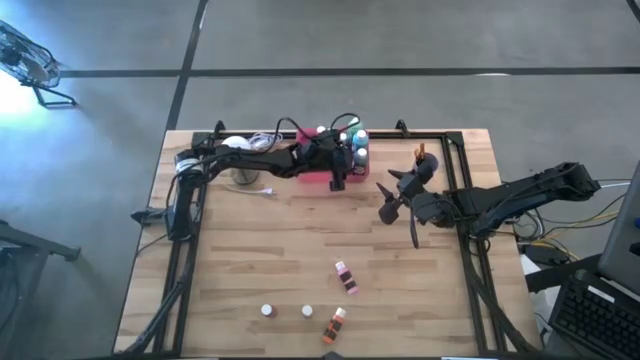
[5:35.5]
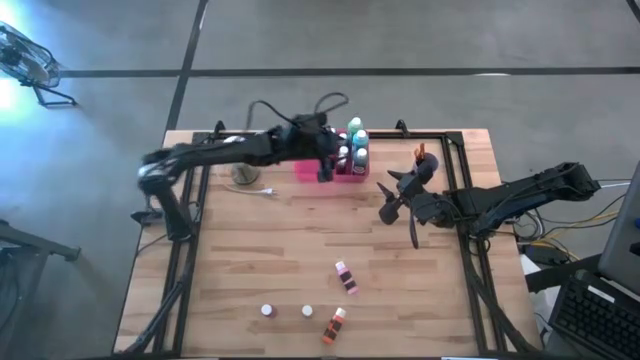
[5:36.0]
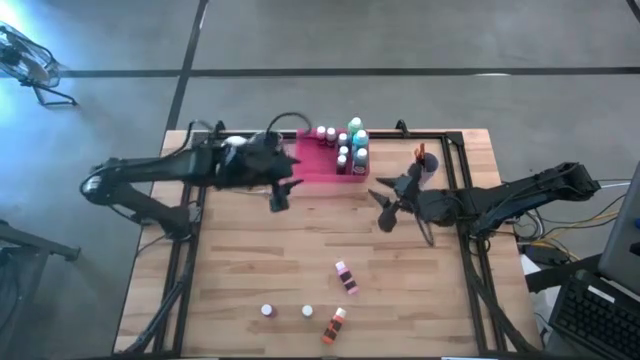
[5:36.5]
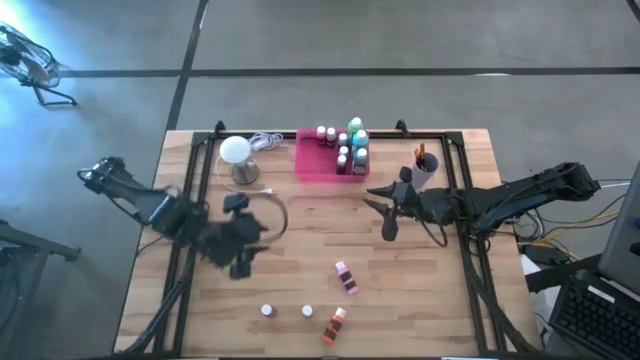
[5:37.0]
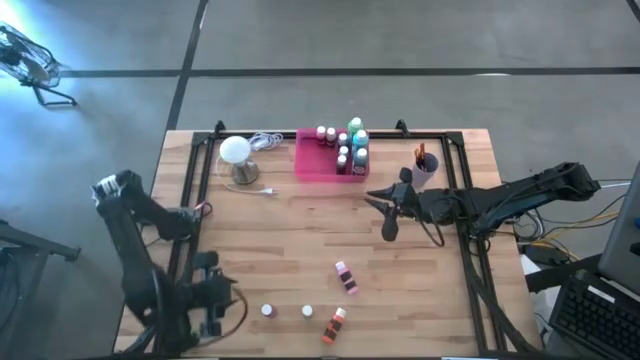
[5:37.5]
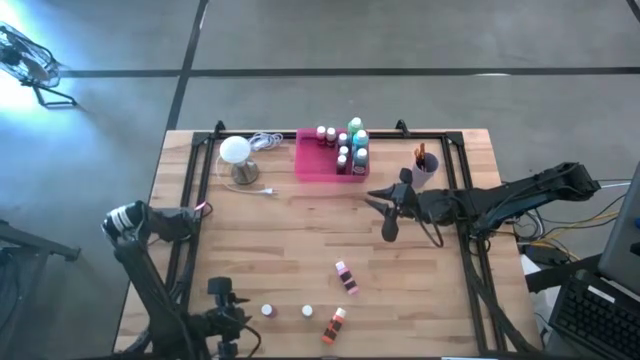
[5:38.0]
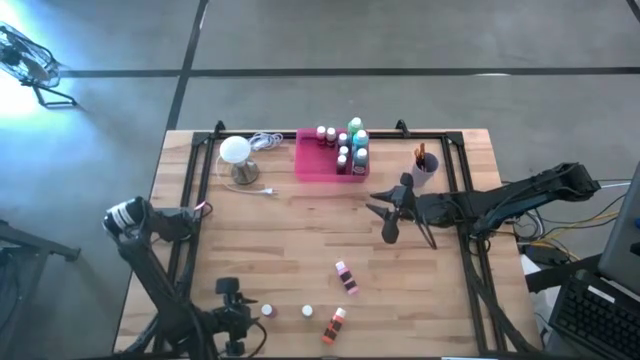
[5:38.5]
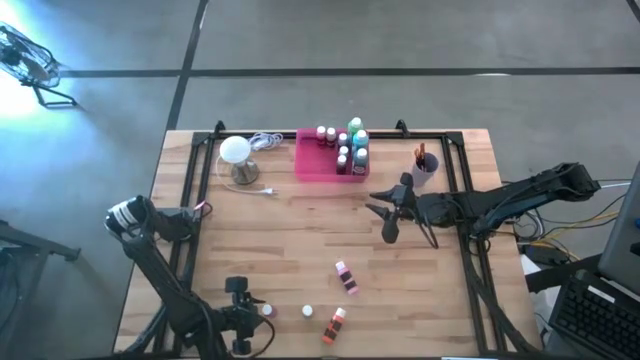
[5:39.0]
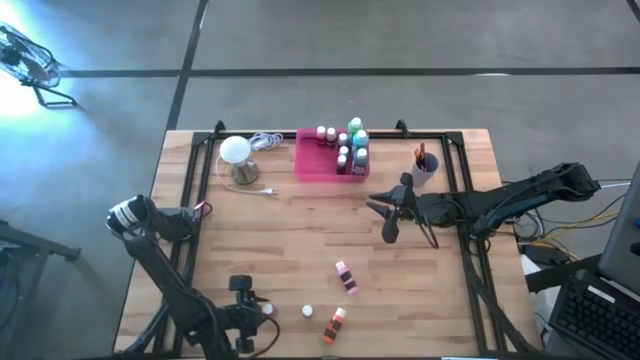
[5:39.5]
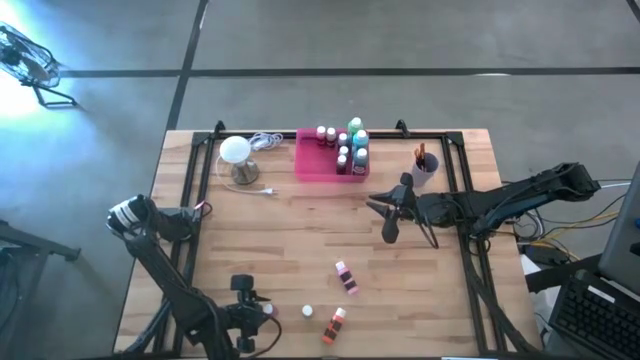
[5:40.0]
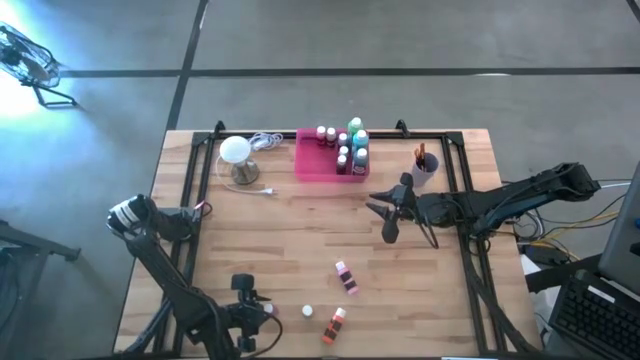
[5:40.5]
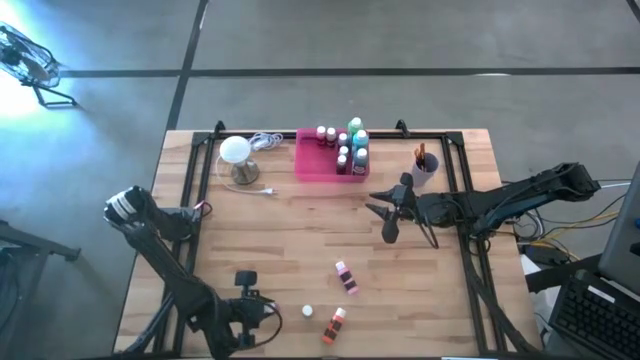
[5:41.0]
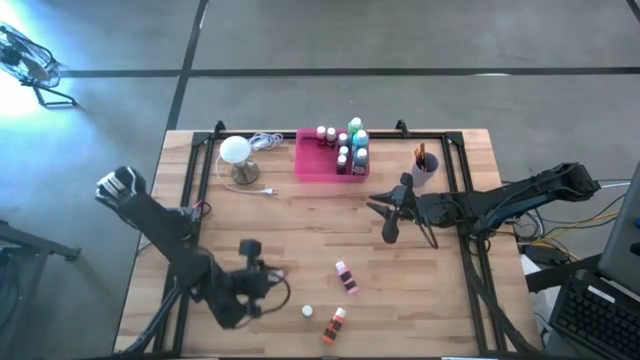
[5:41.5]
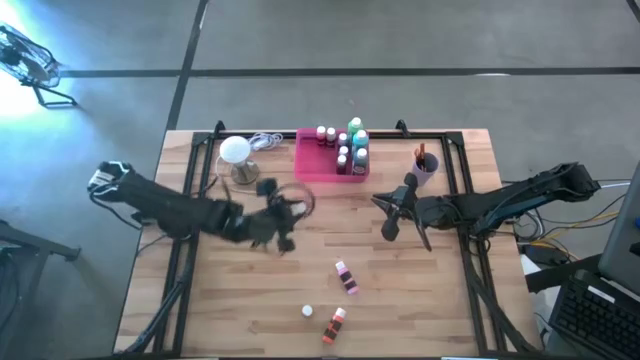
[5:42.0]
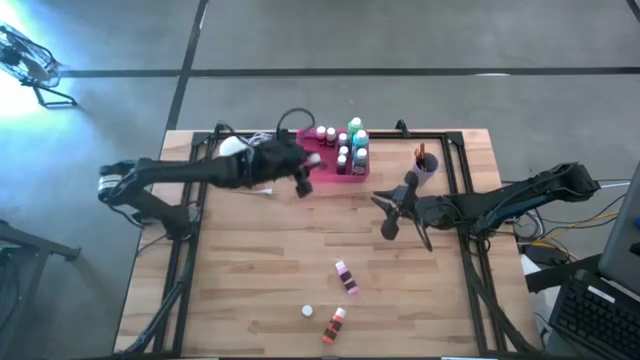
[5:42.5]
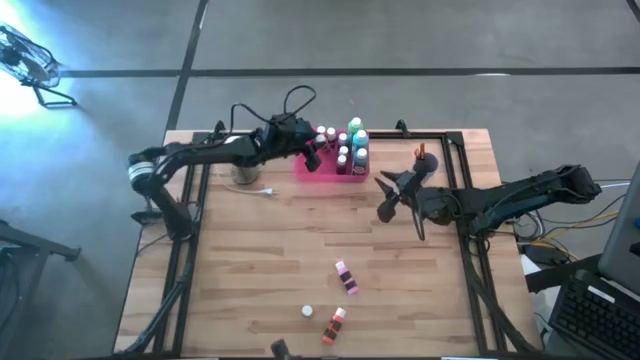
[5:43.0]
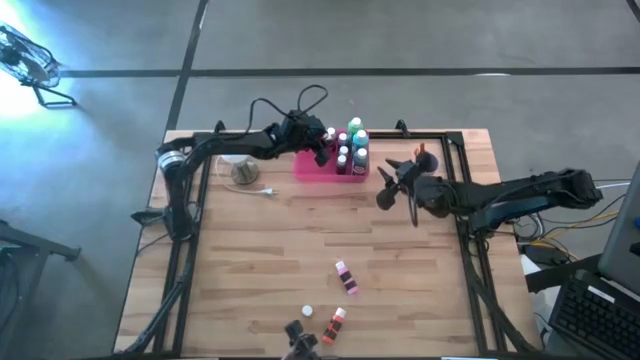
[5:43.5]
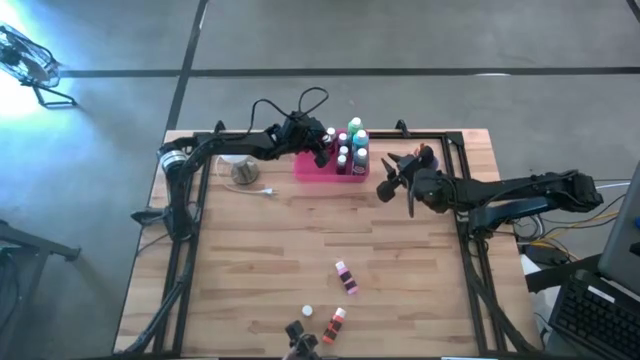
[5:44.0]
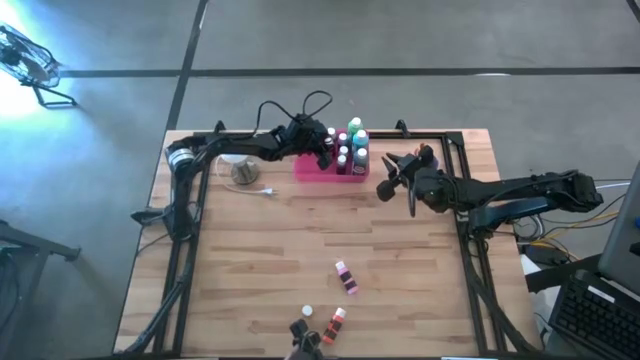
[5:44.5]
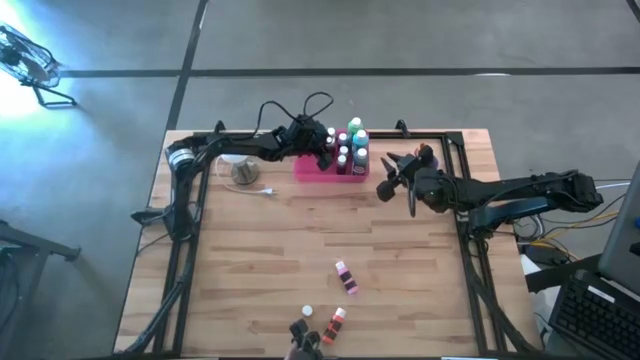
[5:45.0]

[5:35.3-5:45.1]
Task: Pick & Place Paint Supplies
Put the pink black paint bottle into the pink bin

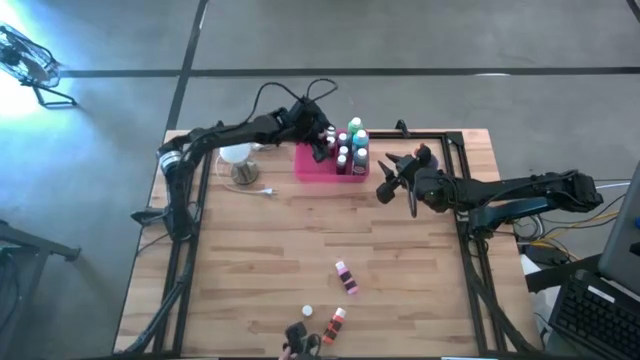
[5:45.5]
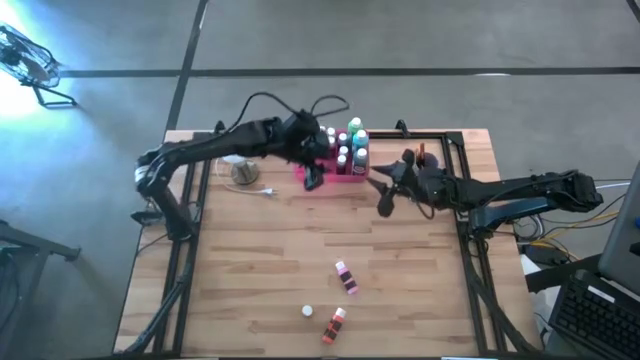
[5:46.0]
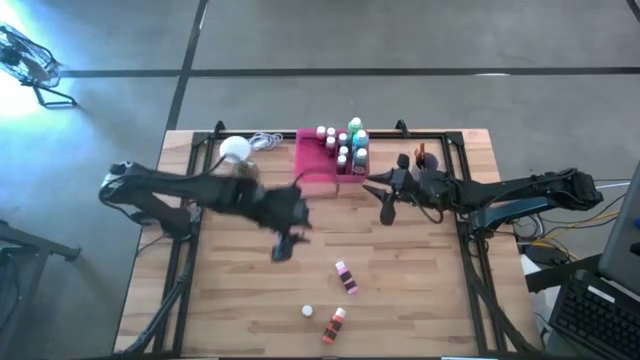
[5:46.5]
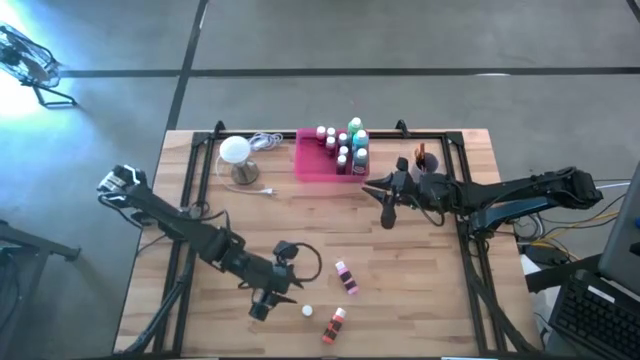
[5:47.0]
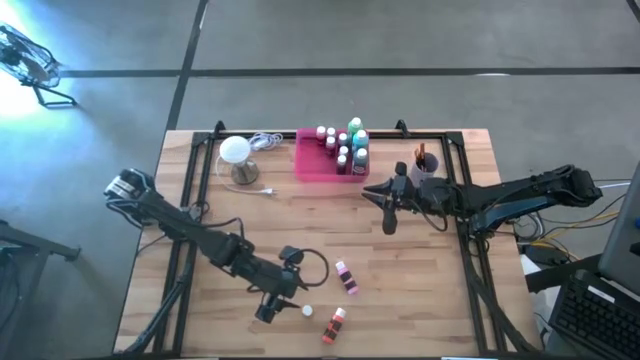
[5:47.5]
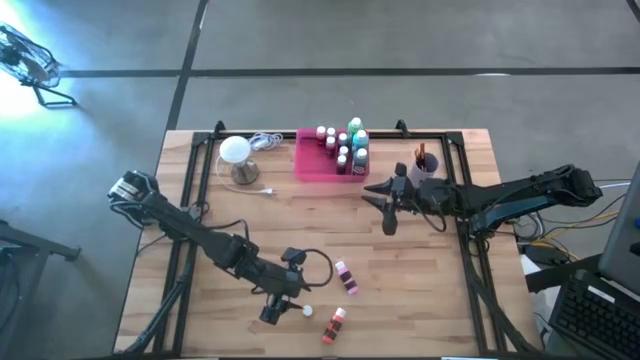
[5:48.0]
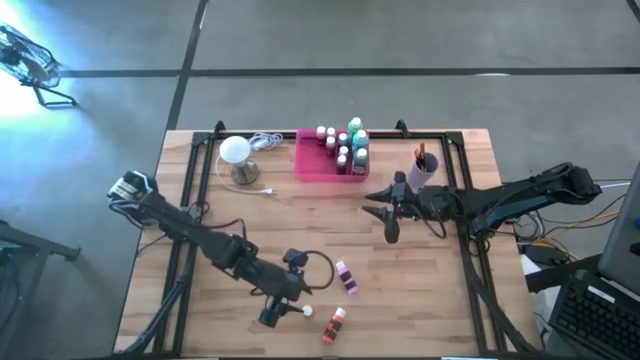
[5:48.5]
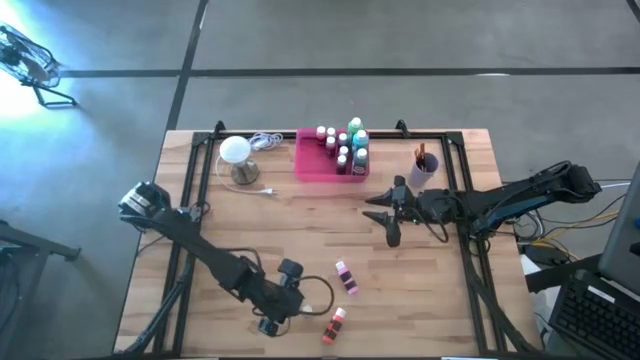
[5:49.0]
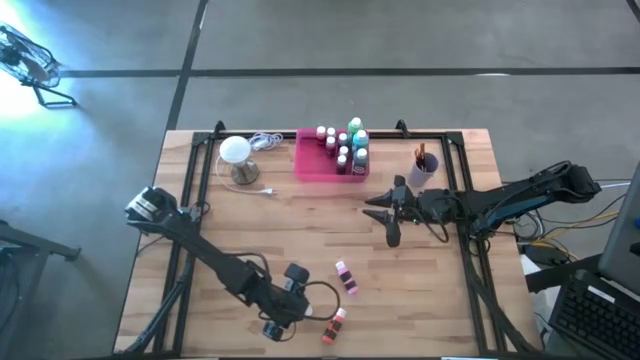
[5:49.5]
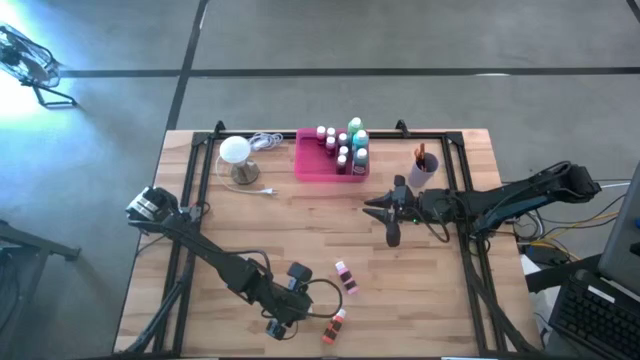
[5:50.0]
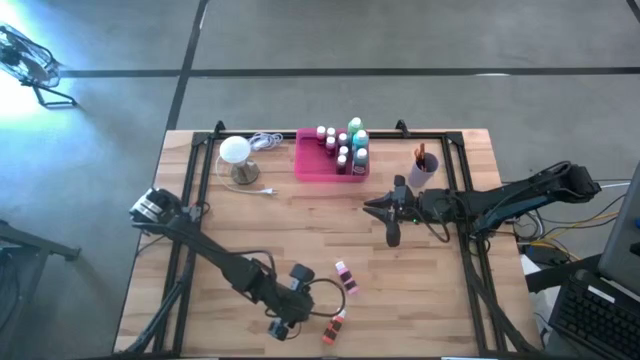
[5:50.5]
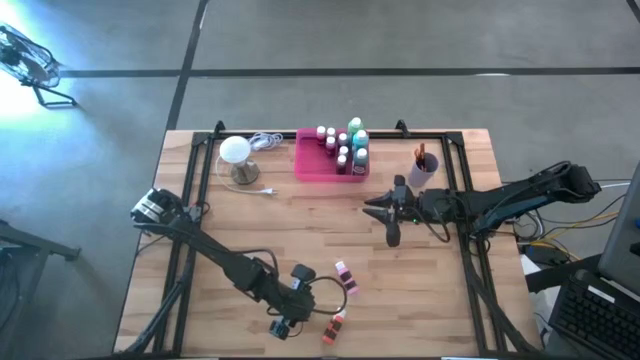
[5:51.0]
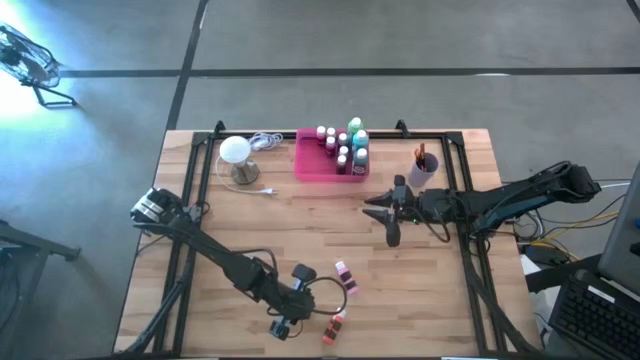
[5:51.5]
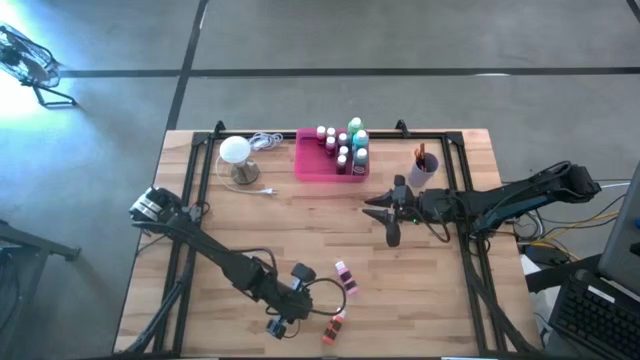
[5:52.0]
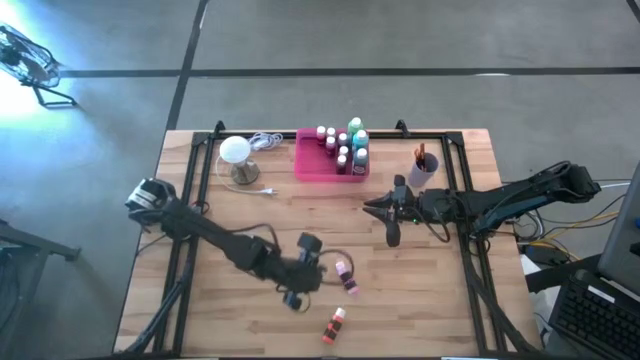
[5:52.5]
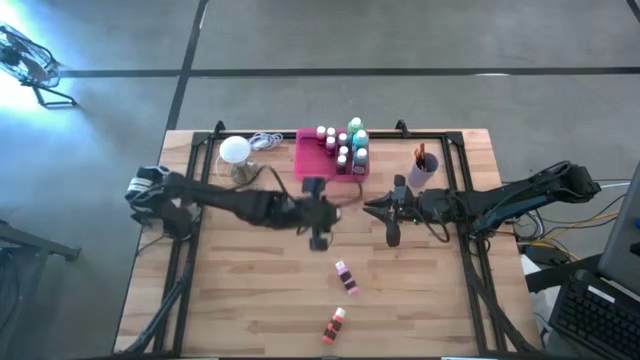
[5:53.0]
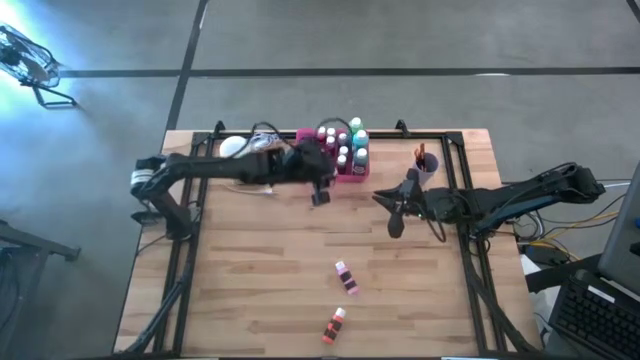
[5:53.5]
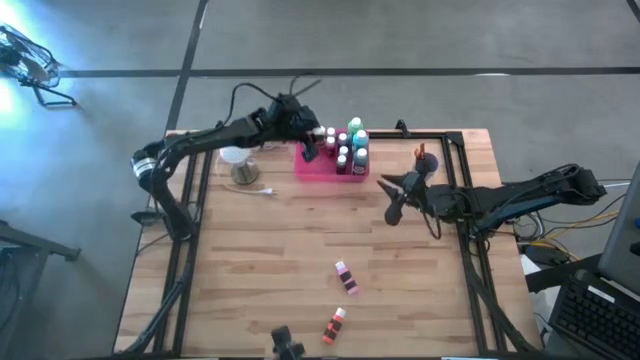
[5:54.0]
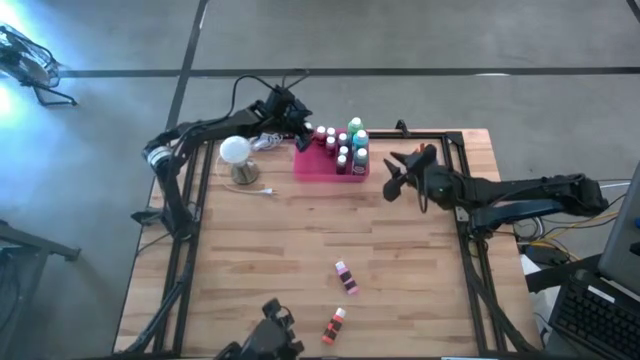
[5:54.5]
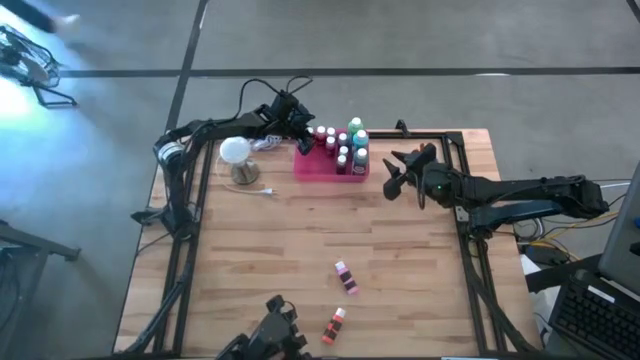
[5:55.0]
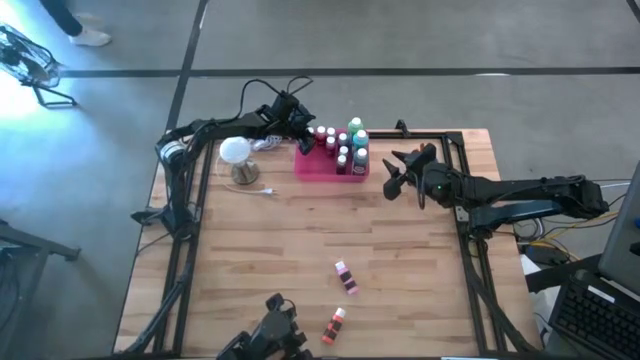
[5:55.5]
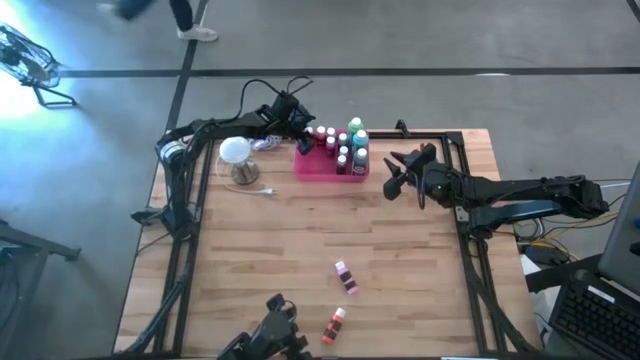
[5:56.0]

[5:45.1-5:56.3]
Put the yellow black paint bottle into the pink bin

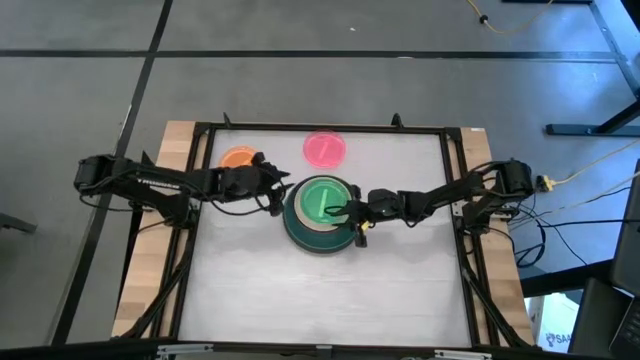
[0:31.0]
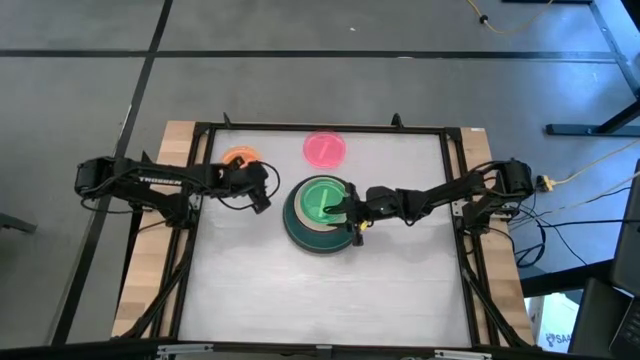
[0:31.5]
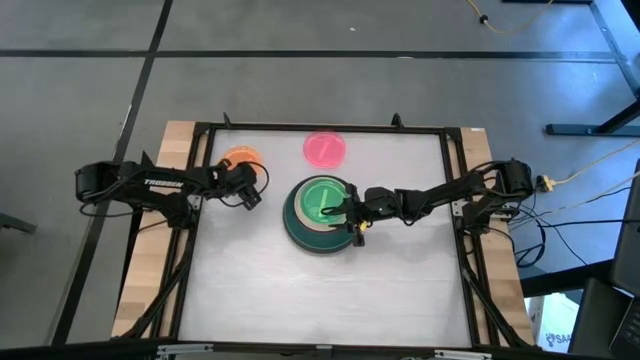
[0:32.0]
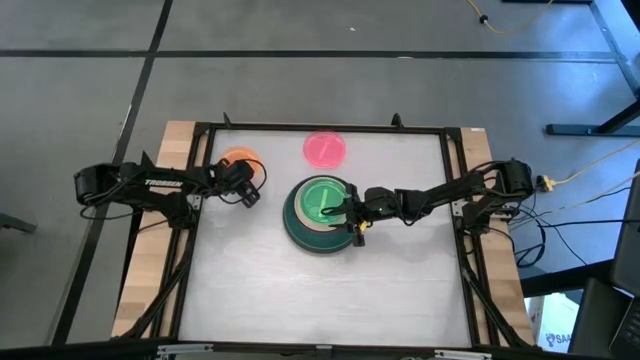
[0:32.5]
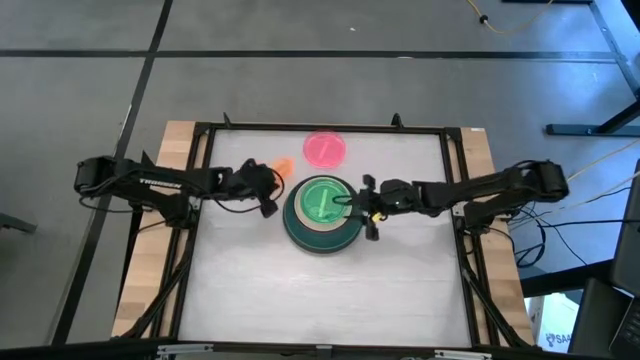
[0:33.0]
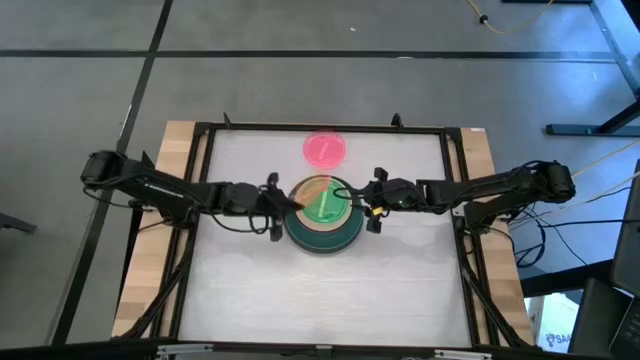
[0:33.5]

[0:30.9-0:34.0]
Task: Stack plastic plates
Stack the small orange plate on top of the small light green plate
